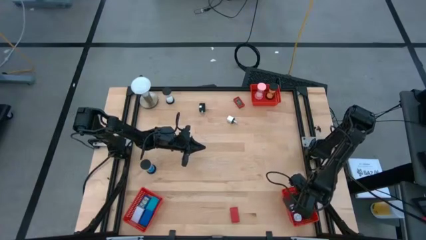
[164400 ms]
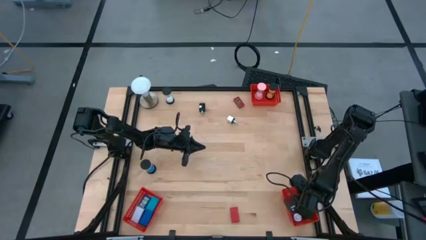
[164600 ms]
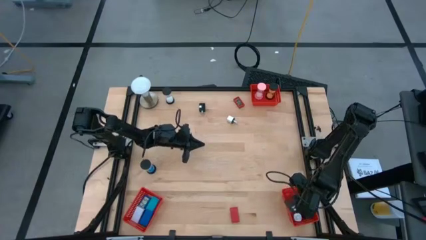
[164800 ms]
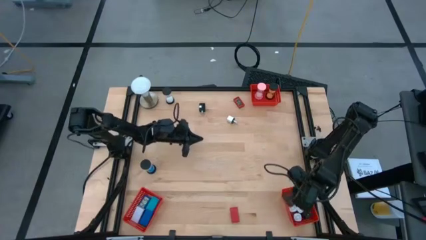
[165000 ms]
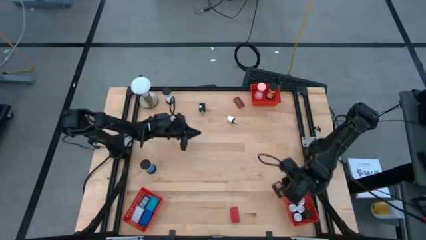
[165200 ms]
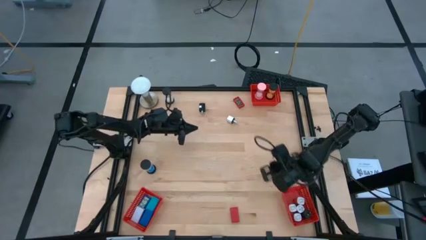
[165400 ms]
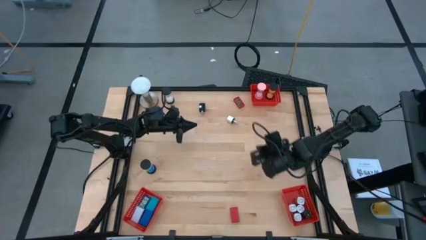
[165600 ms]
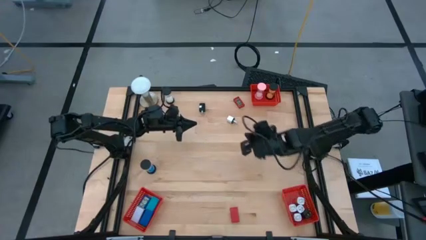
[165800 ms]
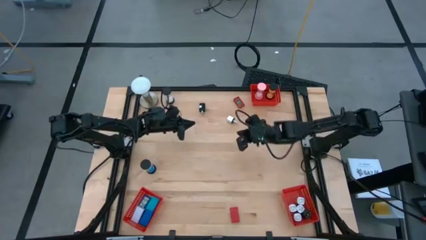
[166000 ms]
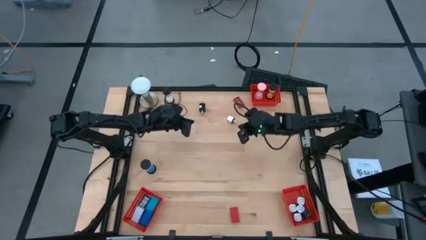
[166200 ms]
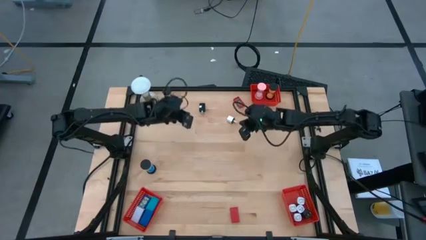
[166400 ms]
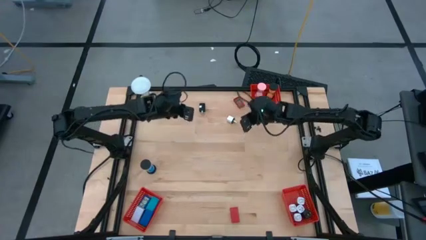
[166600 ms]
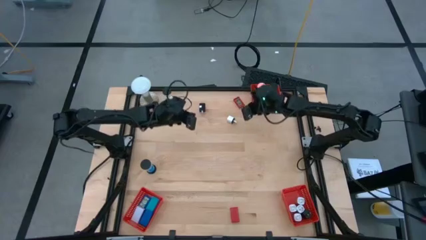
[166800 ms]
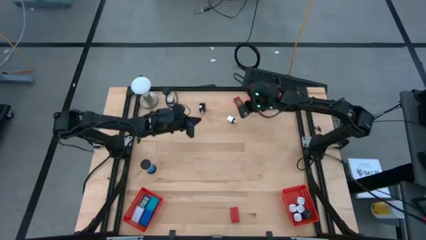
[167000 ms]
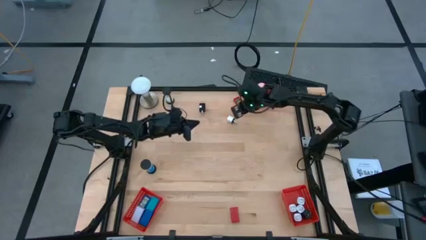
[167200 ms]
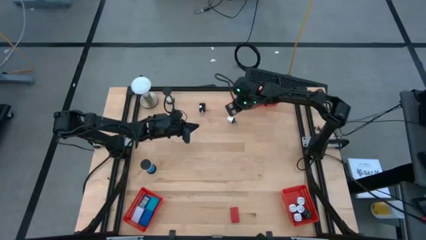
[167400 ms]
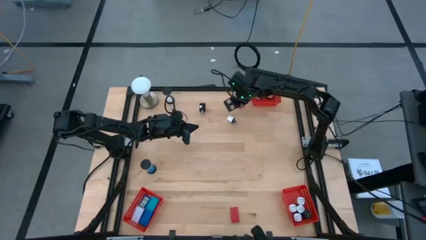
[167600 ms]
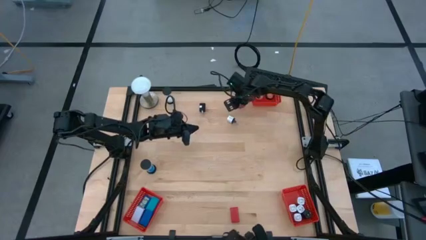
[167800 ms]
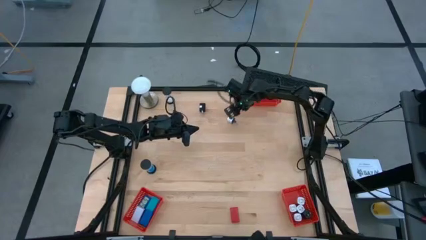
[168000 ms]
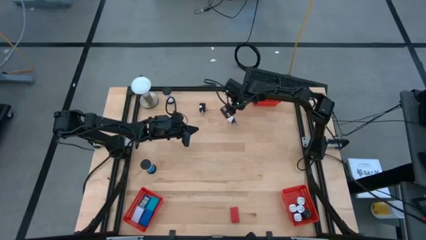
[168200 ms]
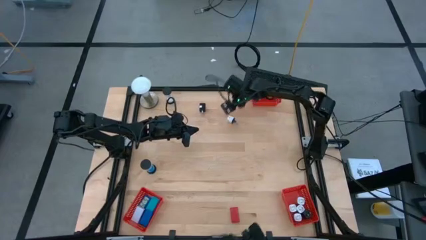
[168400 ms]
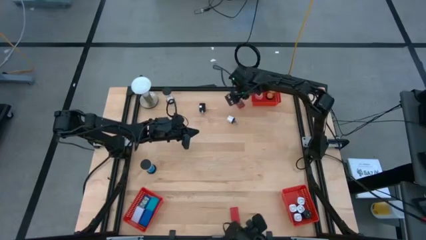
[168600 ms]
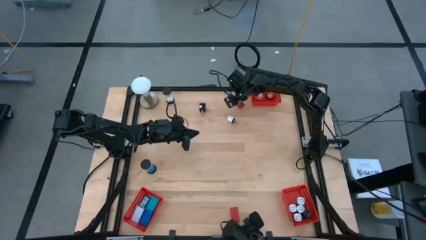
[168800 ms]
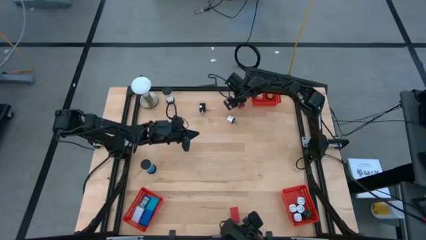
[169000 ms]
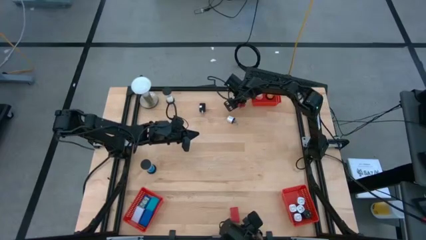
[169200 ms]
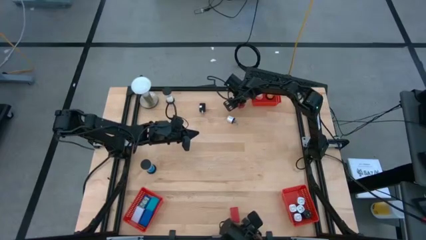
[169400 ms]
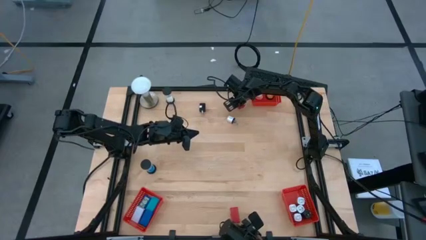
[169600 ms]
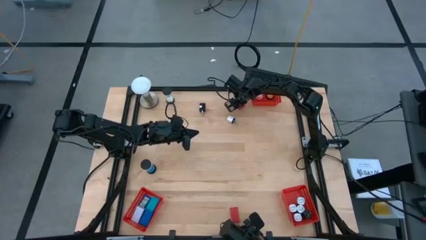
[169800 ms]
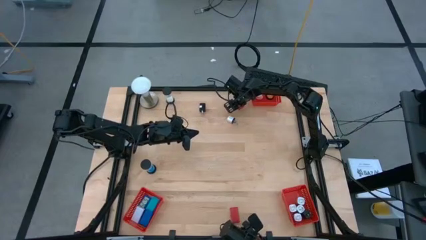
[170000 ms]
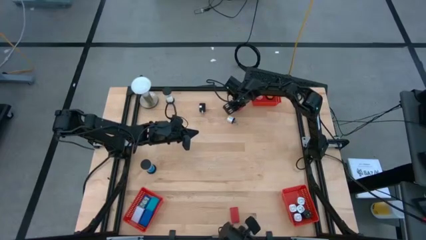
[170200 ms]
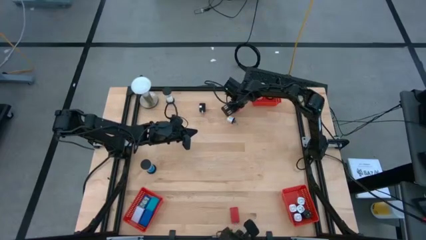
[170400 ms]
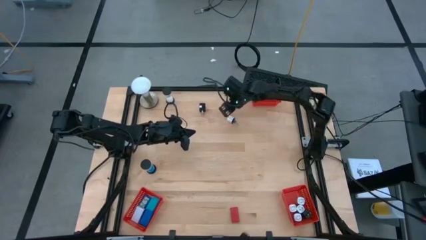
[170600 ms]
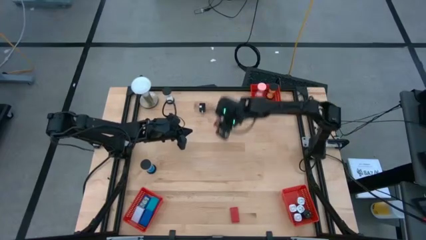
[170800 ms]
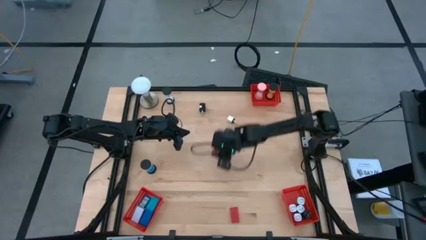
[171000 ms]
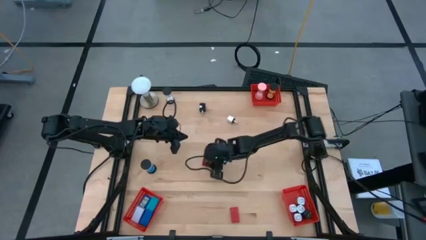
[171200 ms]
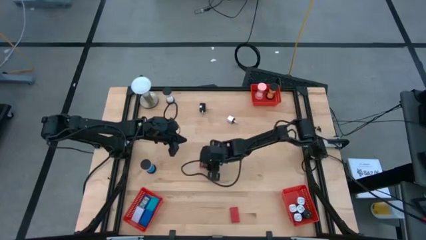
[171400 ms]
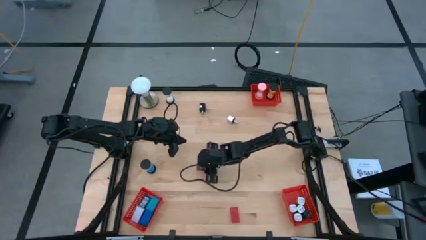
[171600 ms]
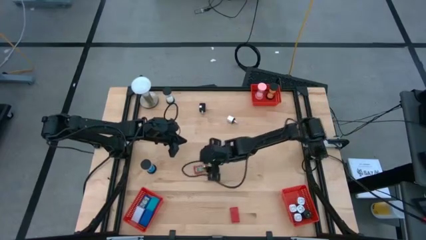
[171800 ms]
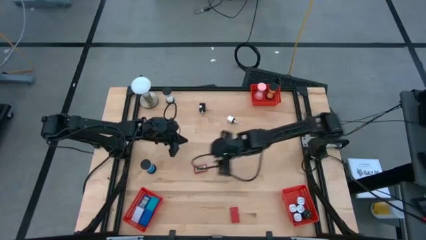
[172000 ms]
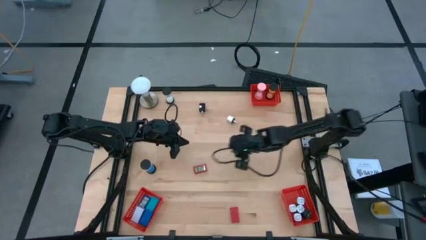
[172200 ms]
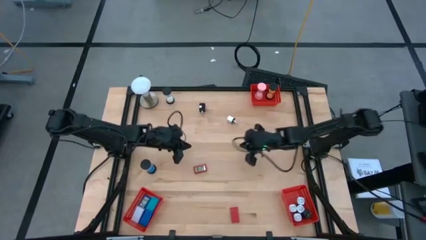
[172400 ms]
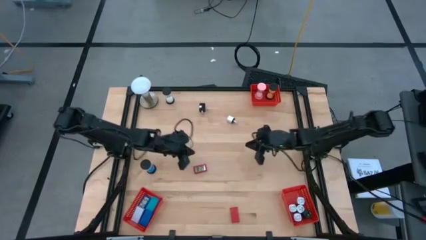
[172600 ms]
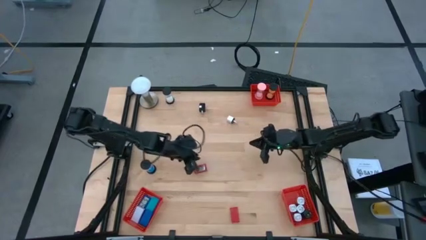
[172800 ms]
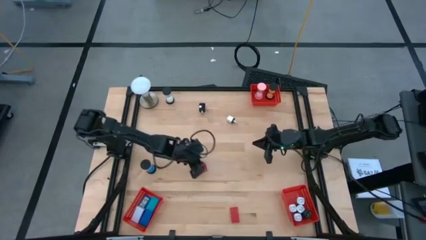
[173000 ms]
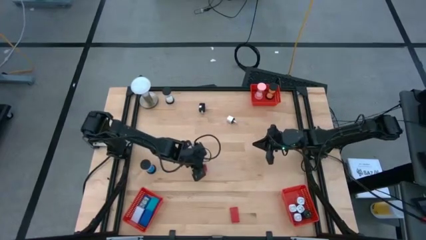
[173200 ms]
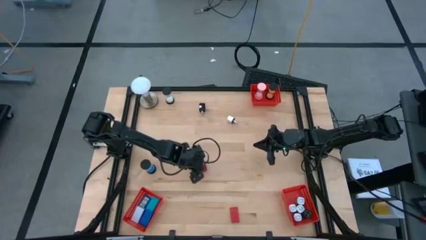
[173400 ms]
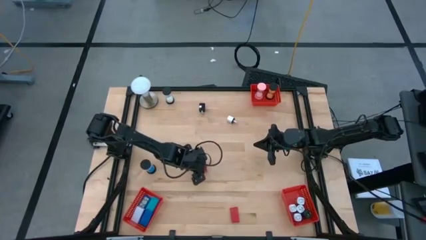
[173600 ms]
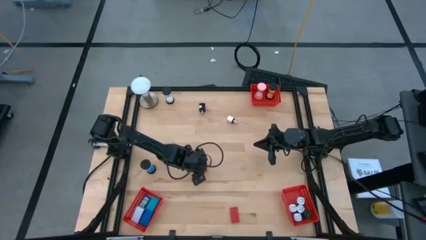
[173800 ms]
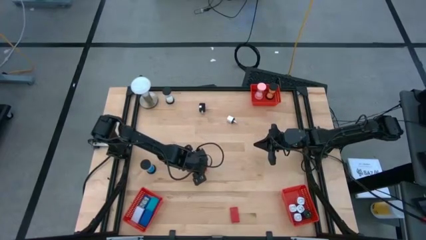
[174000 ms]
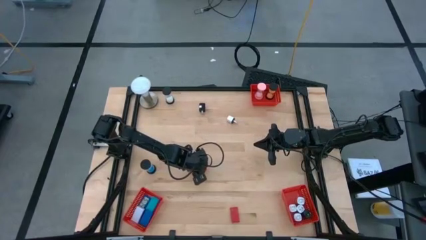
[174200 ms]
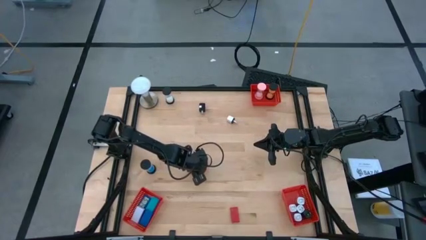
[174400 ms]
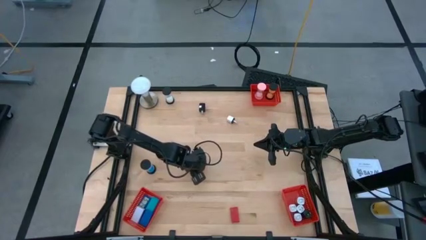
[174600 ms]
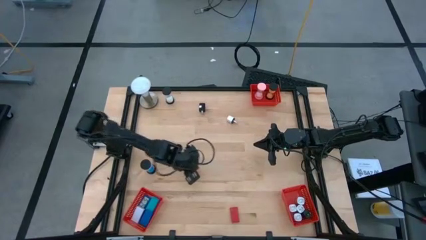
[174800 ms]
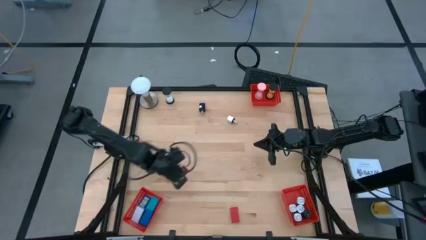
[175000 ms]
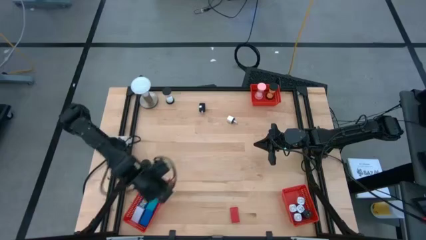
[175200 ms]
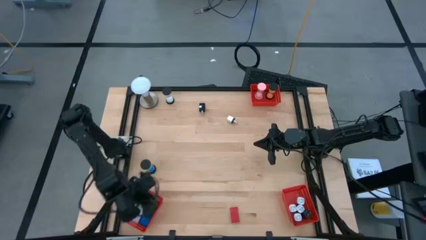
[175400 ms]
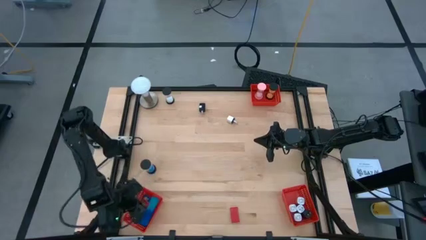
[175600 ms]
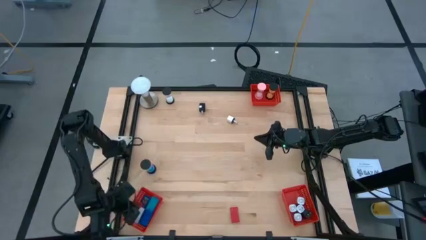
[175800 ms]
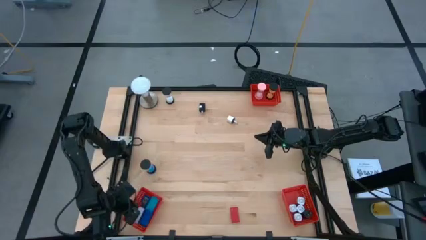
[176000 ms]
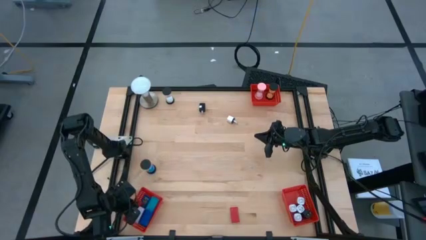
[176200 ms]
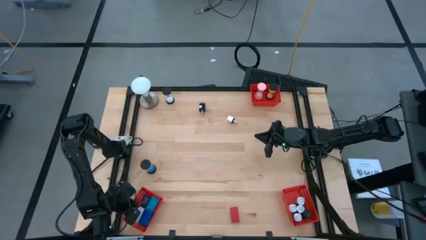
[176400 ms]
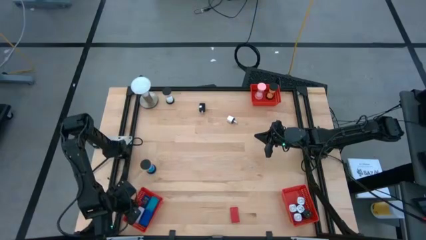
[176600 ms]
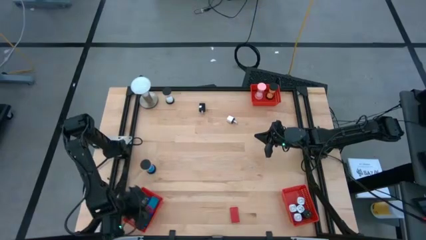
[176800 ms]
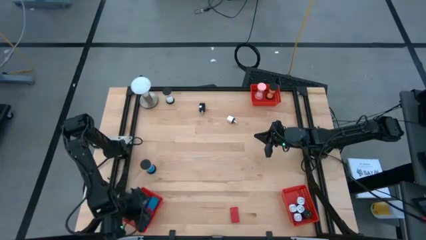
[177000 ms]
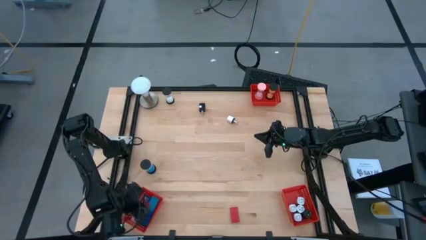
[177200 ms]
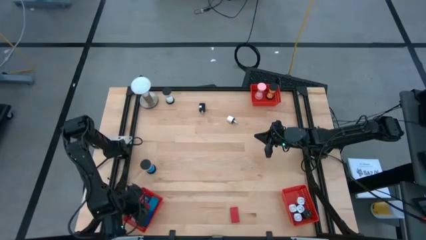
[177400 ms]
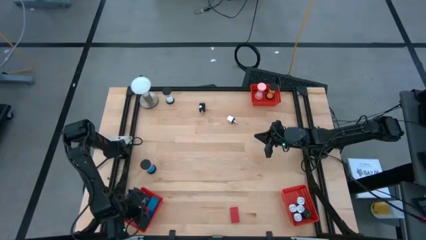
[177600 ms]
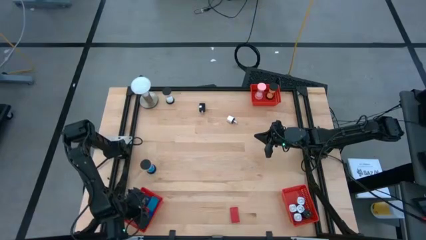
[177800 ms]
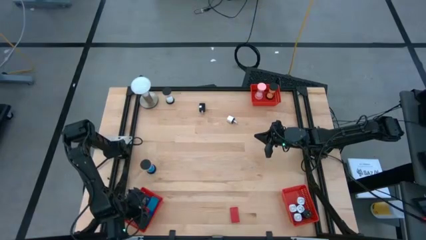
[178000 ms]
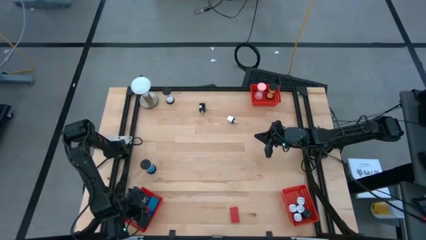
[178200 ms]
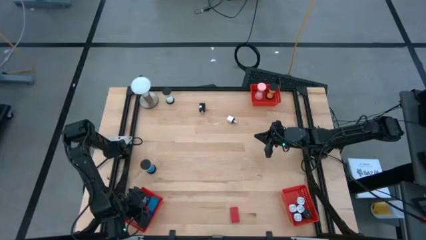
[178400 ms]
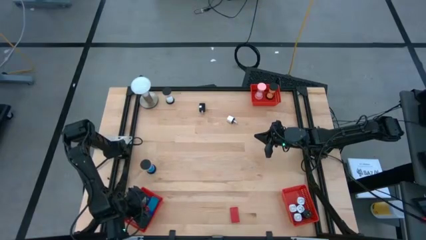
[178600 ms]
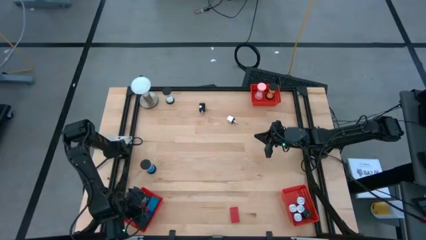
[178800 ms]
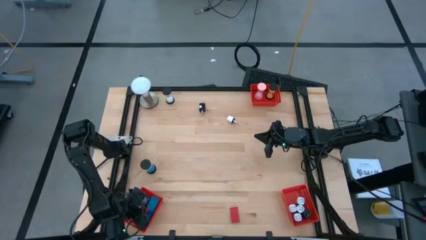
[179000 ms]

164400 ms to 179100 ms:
Task: Pick & Place Office items
Put the top red digital clock into the bottom left red basket

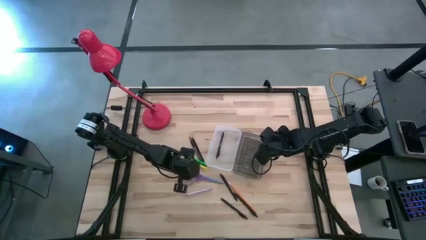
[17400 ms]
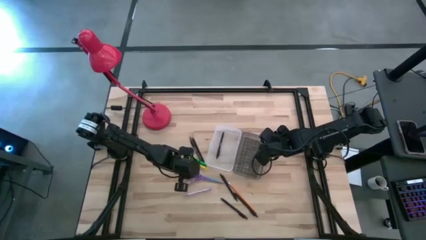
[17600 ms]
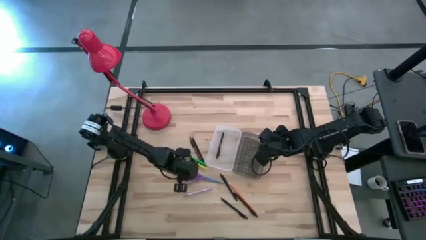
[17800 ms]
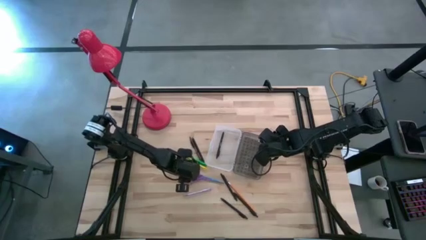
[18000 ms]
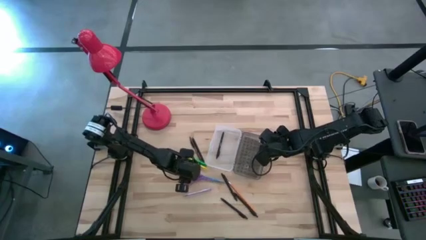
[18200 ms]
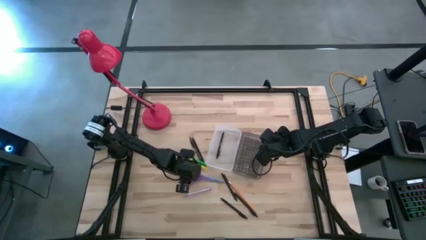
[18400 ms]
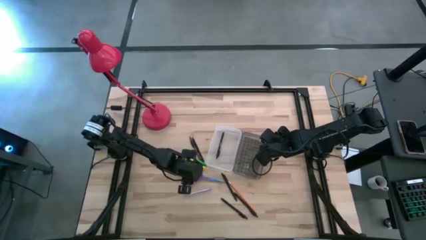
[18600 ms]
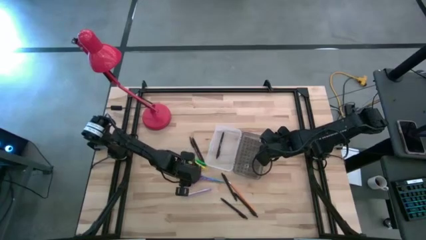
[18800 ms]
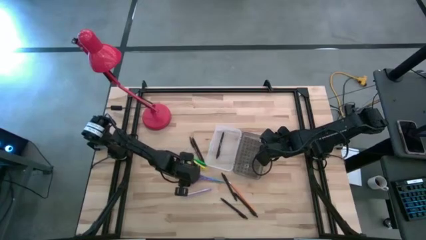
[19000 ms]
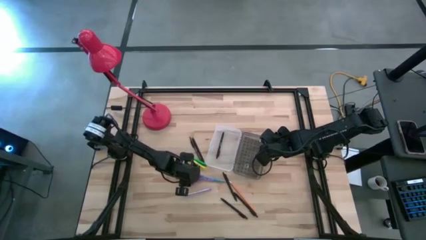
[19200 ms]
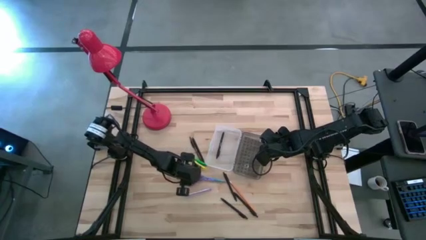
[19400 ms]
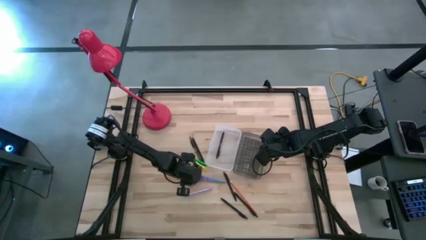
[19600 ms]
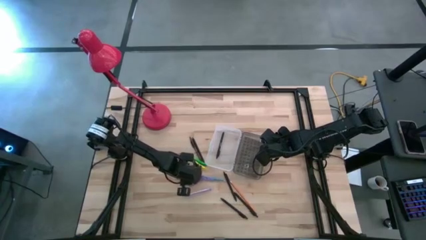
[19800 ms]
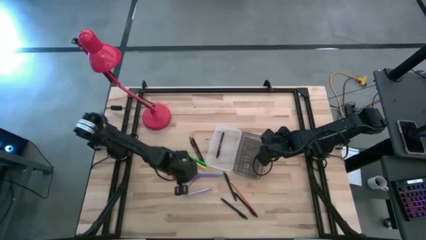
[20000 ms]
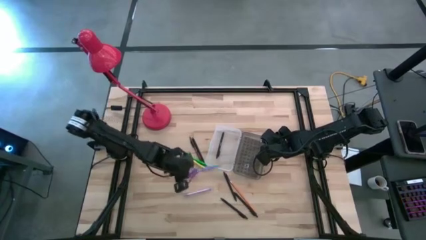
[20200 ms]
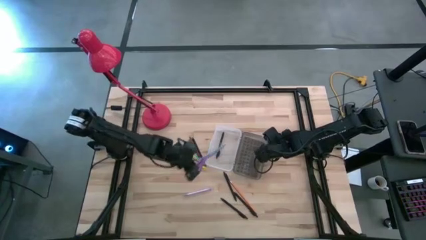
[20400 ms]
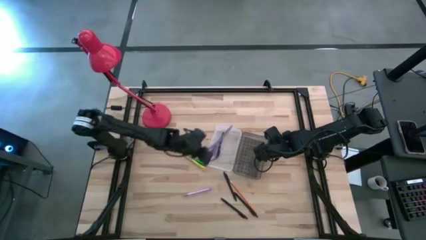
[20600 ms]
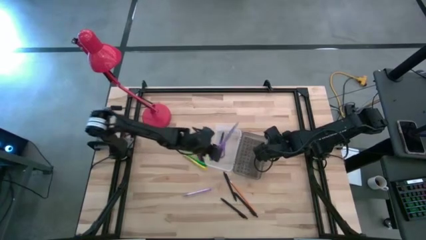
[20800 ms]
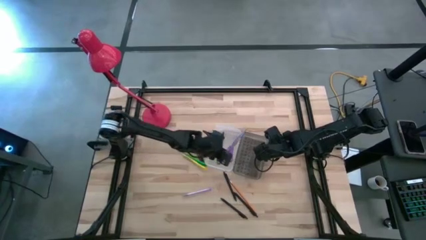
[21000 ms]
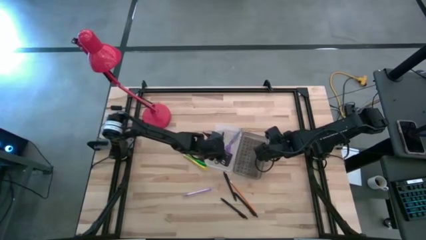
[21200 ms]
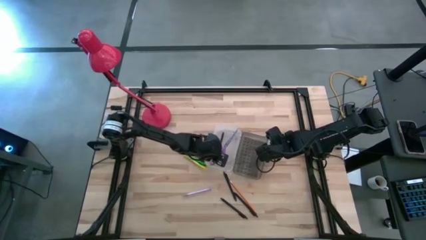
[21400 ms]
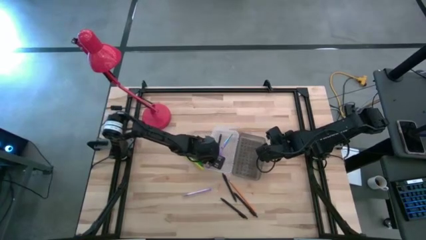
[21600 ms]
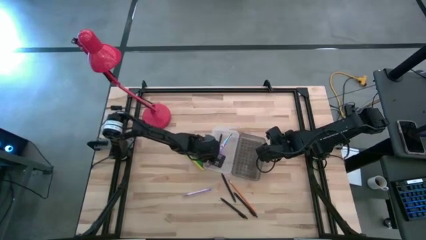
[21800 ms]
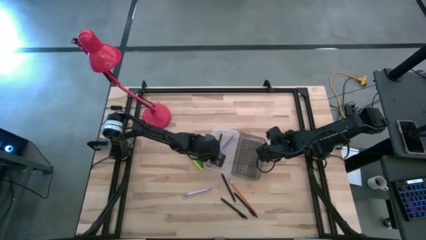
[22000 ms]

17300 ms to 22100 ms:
Task: Pick & place school supplies into a supply box
Put the purple scissors into the supply box
